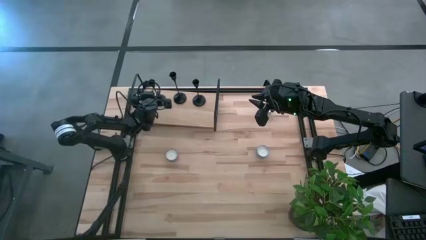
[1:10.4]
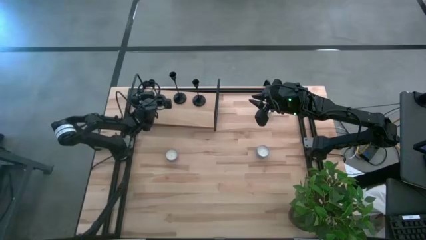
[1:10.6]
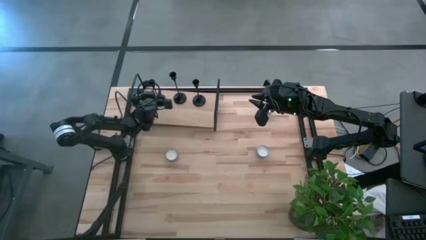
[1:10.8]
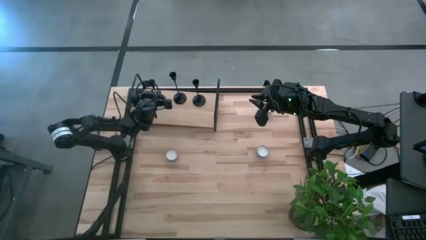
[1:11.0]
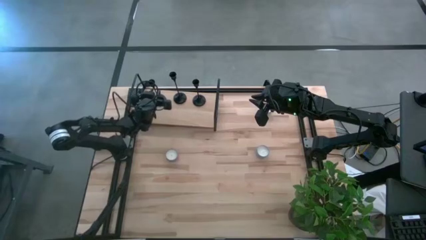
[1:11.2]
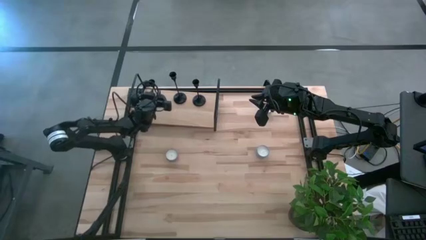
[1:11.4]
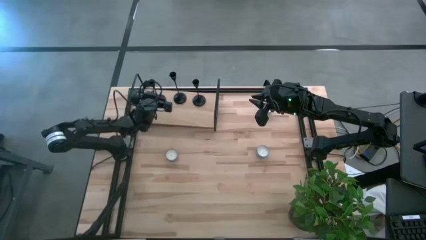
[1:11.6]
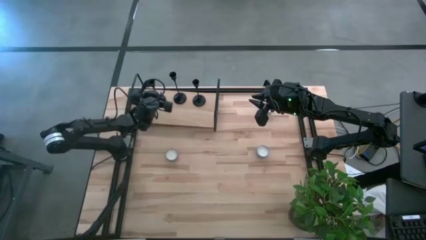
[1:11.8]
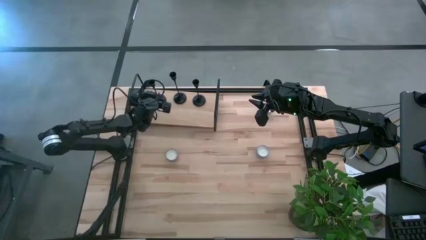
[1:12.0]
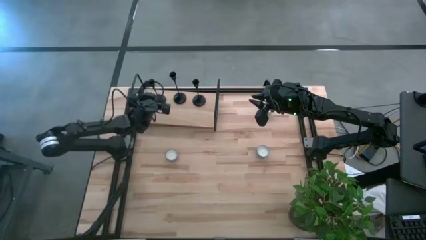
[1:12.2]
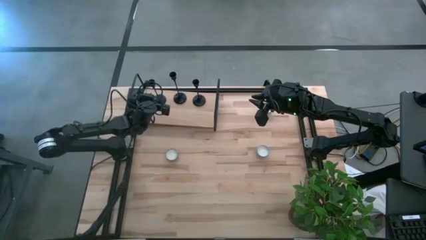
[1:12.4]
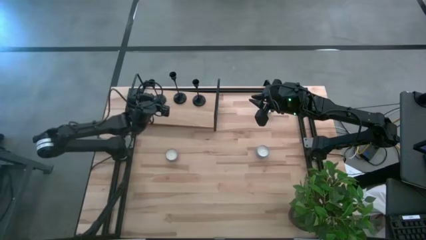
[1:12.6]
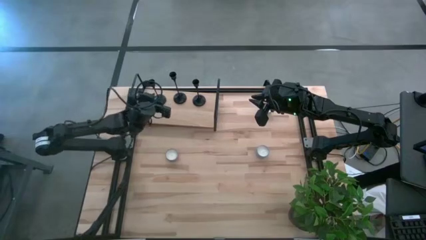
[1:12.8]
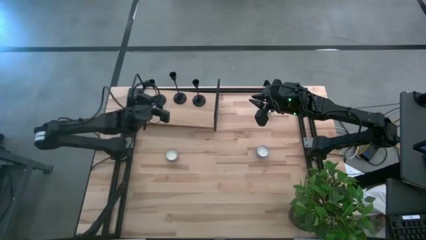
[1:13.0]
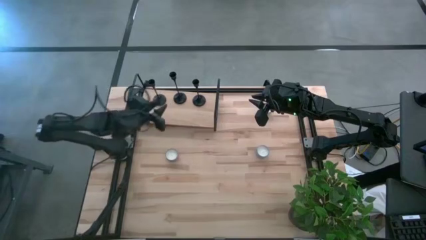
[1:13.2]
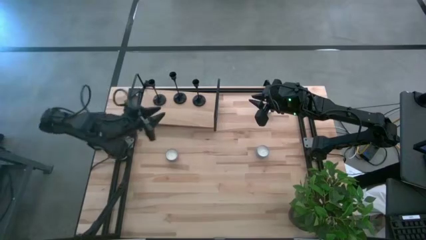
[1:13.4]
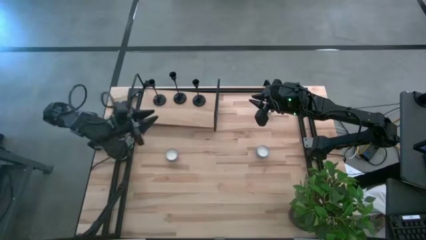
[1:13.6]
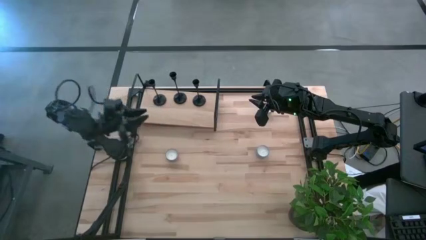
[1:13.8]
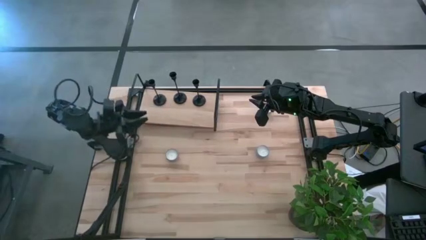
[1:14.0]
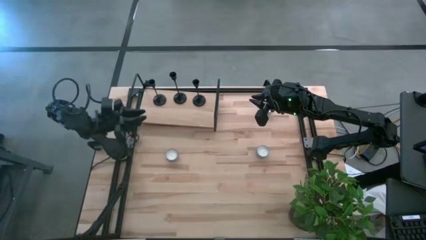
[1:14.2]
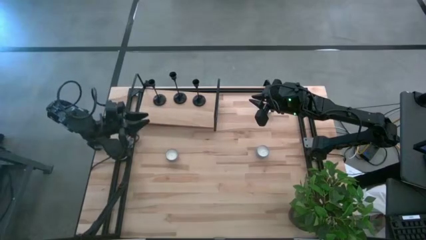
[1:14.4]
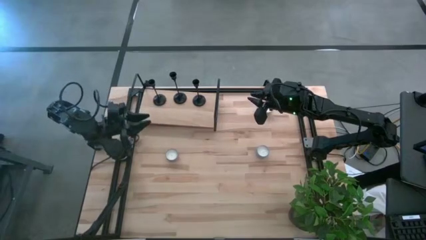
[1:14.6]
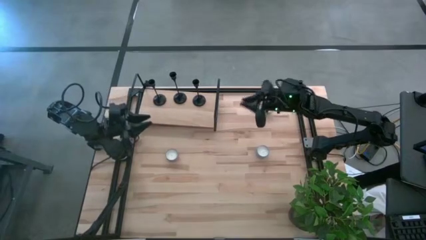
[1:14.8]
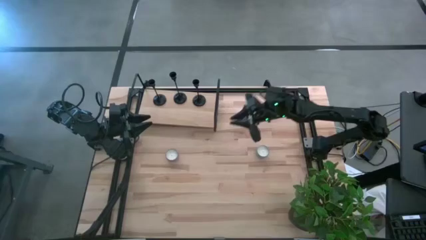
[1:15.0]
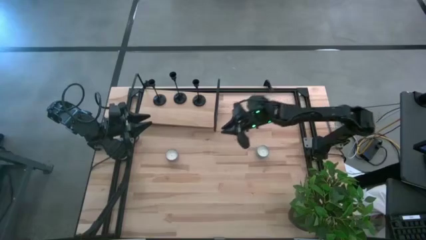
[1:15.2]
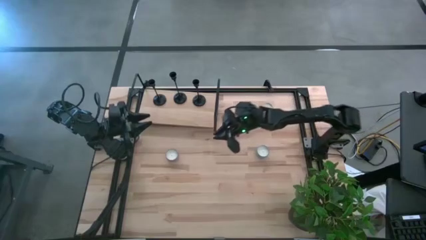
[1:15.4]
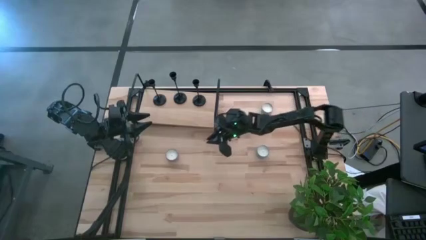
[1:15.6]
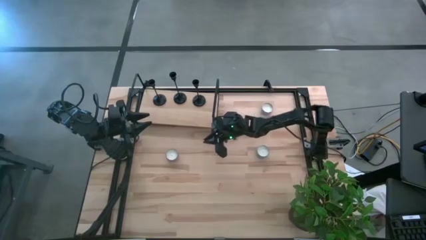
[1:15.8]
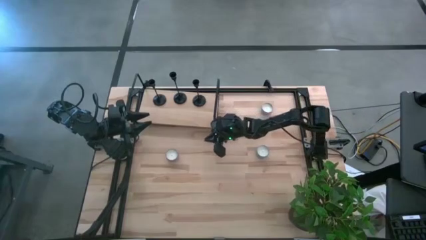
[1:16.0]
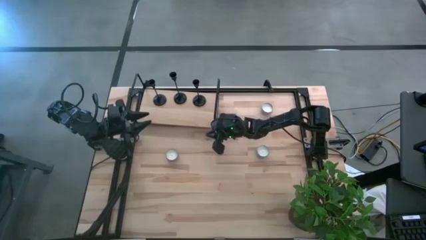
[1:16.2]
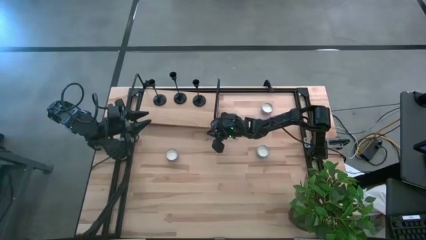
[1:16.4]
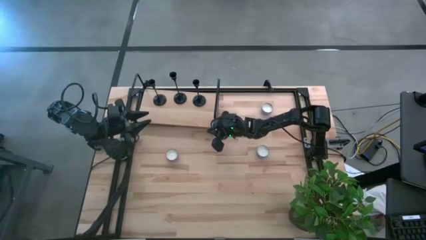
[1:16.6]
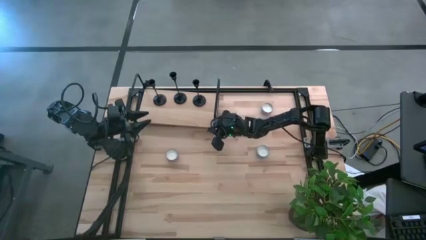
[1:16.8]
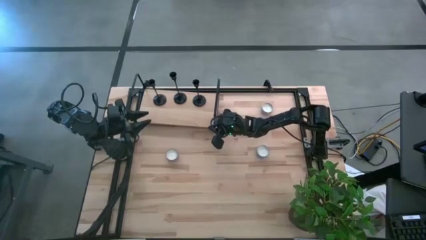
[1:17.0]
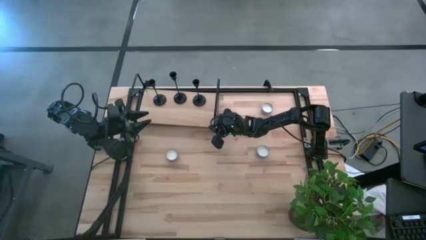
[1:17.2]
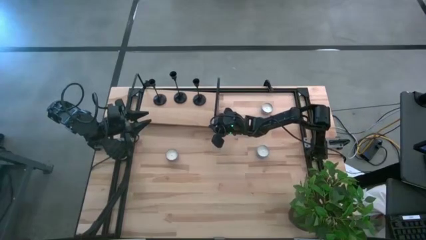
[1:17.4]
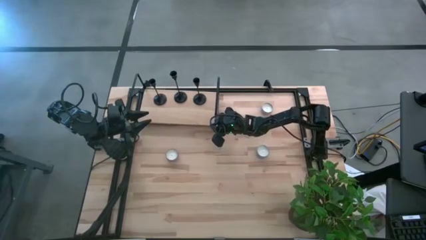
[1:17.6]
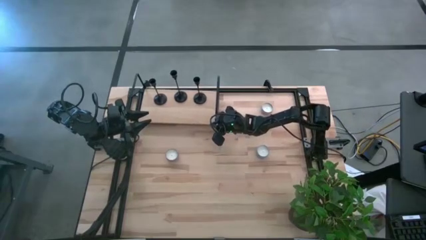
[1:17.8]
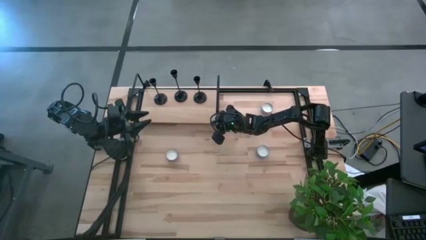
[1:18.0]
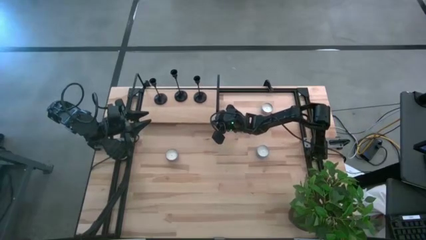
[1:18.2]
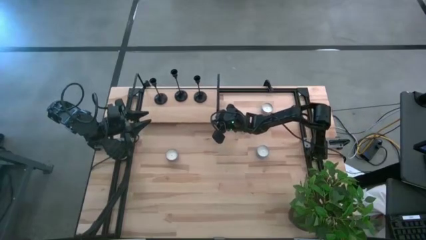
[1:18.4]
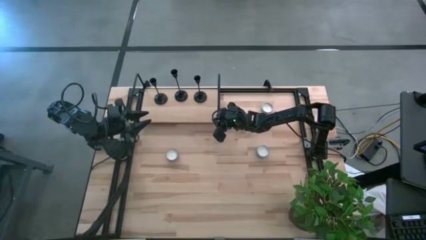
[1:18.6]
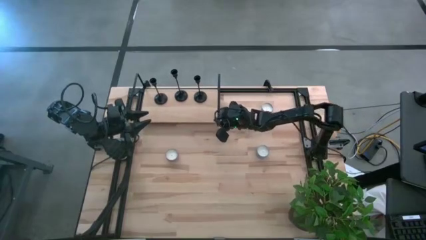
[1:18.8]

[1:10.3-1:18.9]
Task: Pick & Place candle stick holders
Adjust the shelf on the table

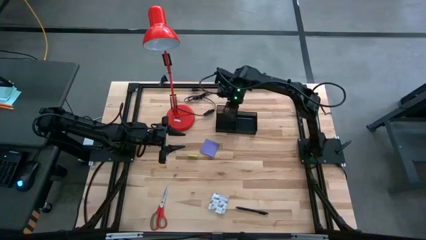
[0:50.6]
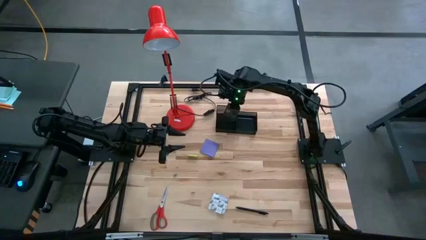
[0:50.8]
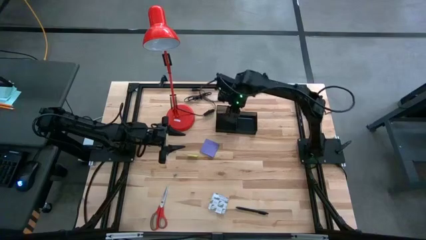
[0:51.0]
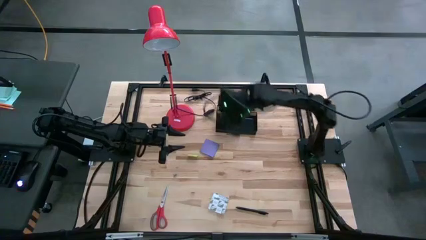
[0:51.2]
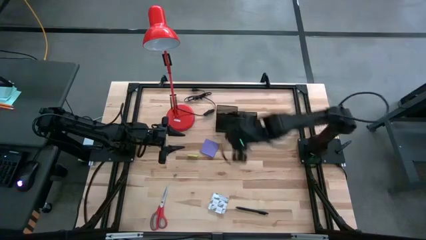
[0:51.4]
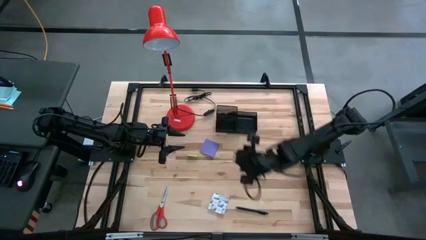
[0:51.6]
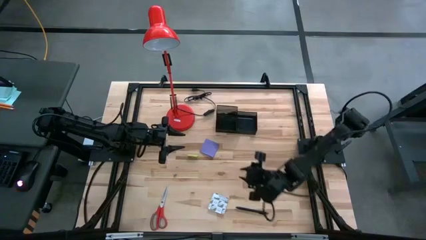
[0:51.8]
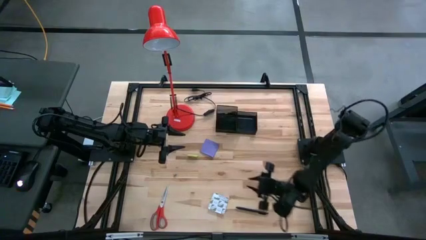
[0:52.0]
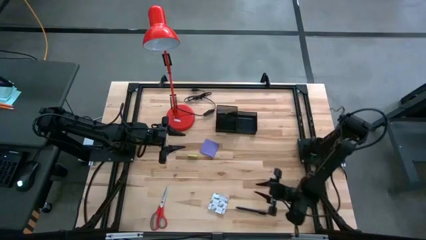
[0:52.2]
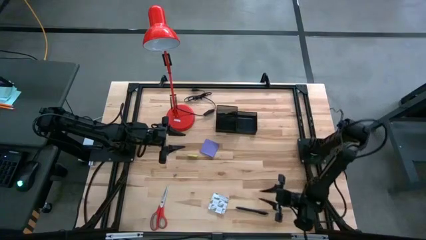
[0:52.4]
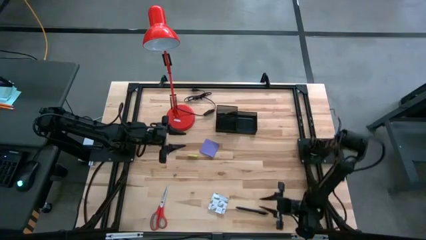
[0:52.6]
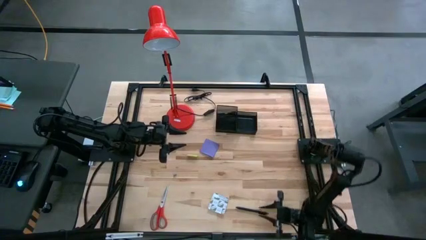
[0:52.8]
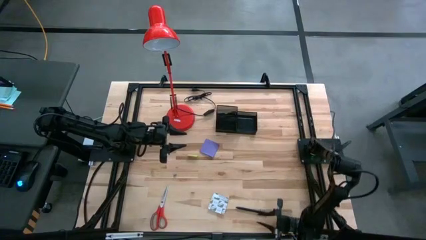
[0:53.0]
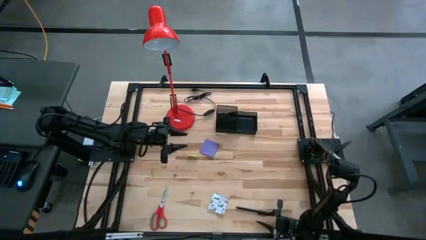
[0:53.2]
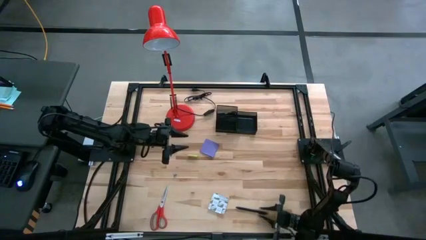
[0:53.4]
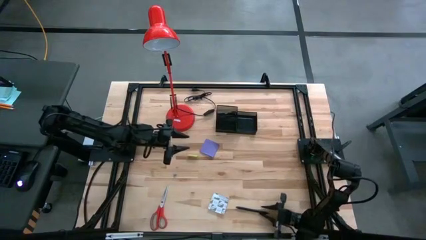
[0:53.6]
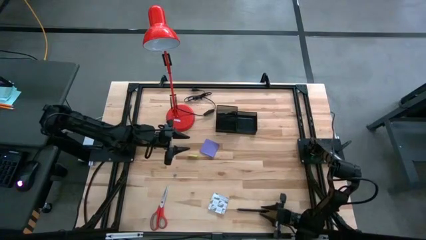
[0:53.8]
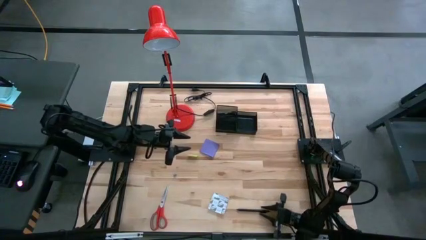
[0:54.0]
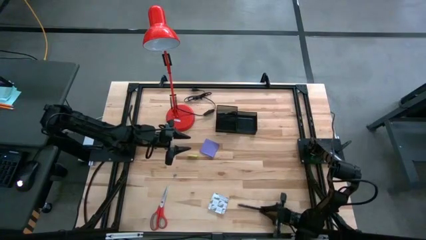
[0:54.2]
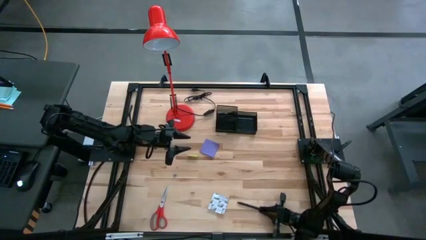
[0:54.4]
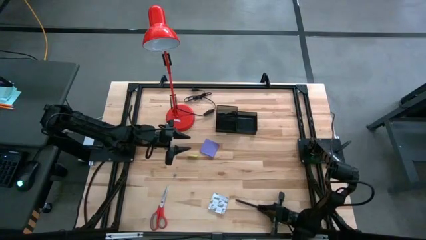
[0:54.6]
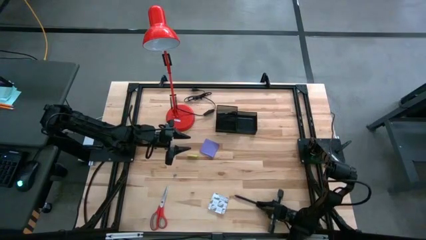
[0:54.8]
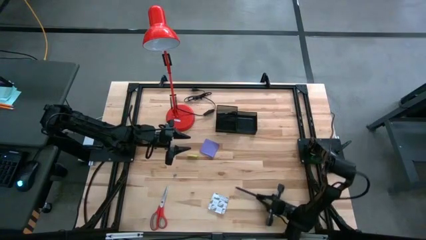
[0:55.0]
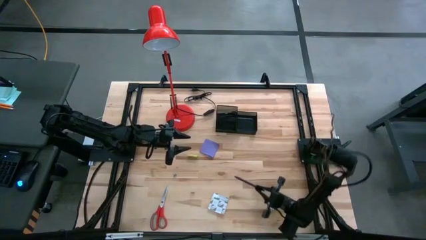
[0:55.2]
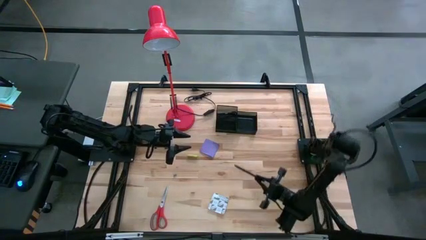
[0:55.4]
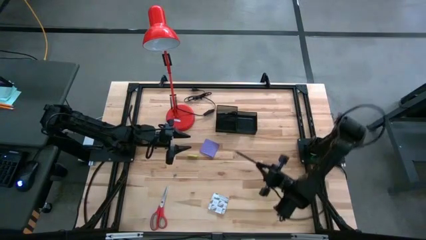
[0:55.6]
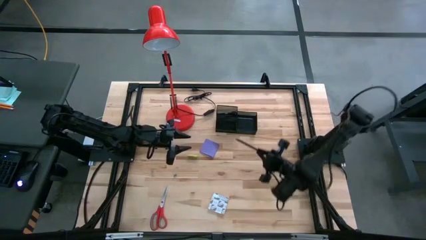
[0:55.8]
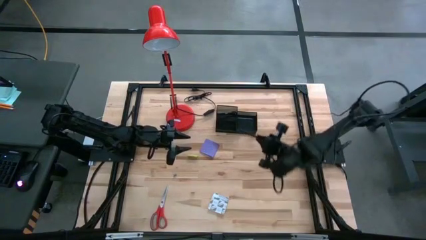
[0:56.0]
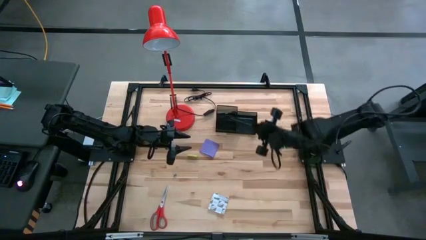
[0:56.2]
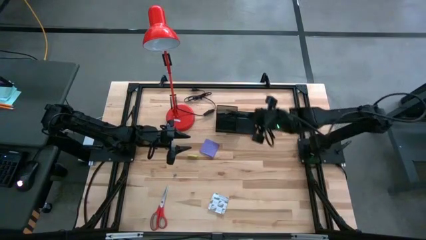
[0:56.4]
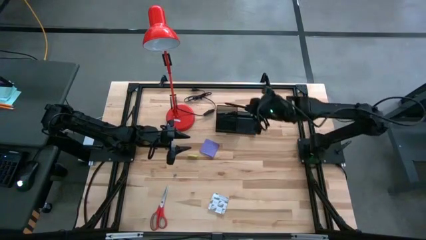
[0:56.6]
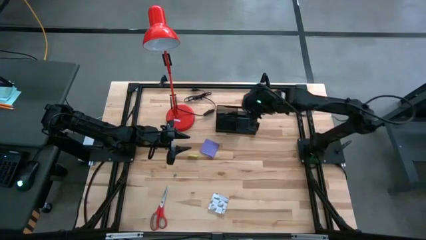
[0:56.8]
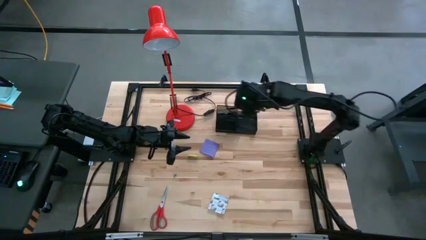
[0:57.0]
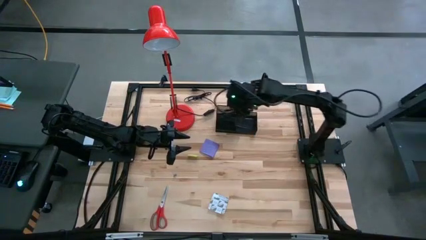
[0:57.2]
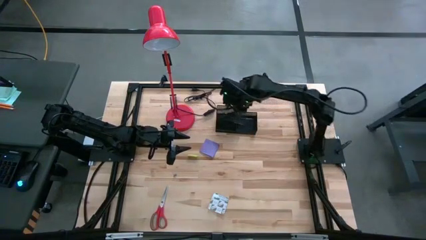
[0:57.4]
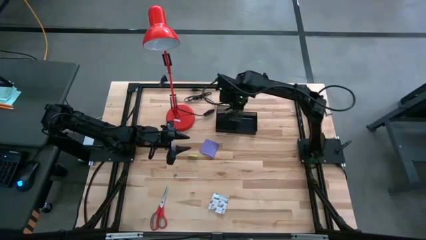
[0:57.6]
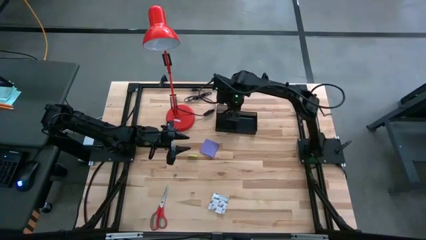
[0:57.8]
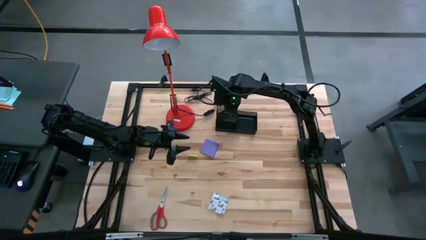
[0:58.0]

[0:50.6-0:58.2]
Task: Pick and place office supplies into organizer
Put the black pen into the black desk organizer
